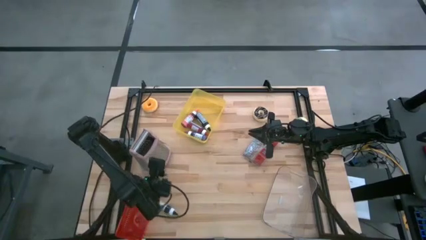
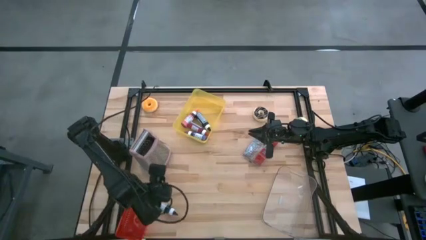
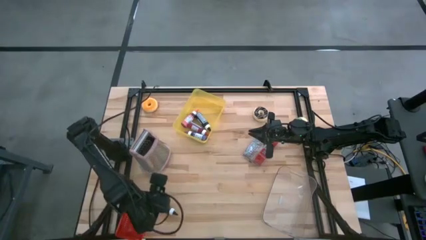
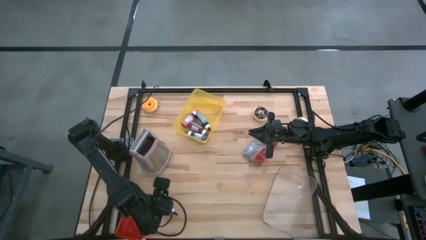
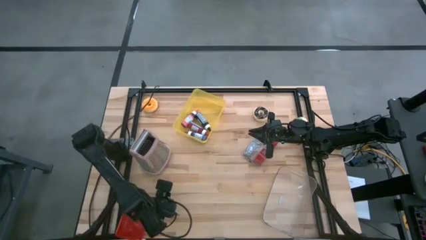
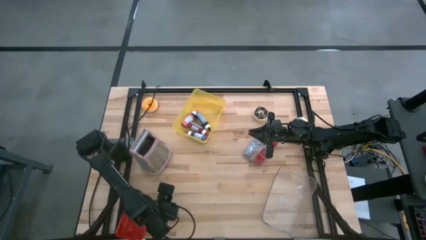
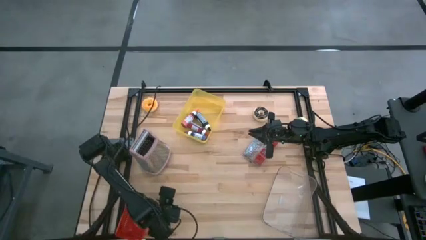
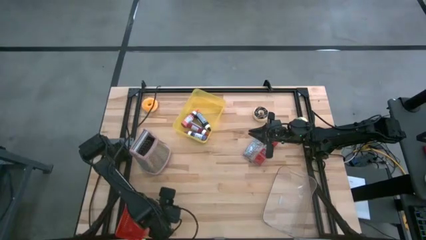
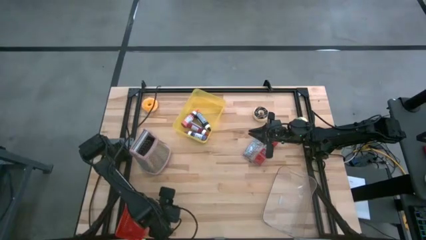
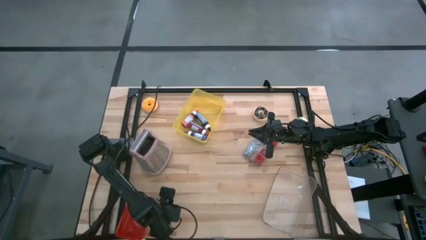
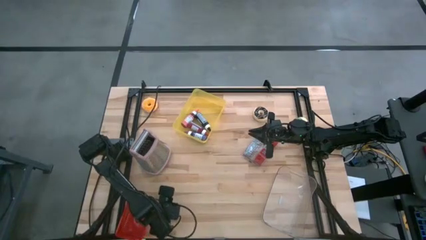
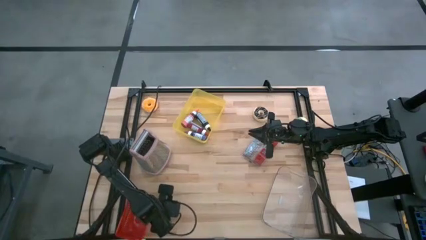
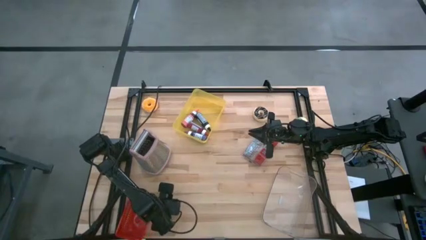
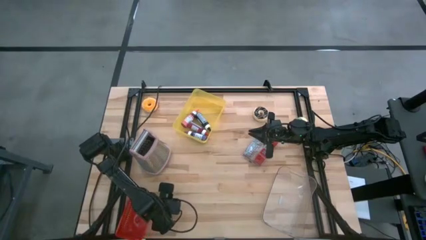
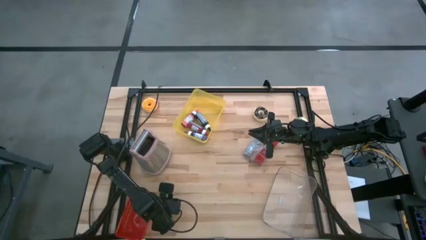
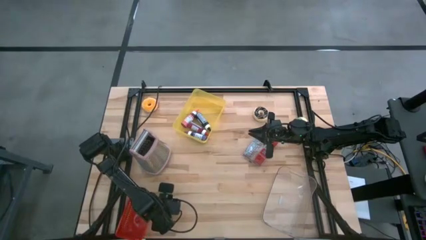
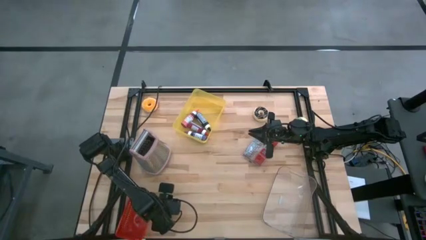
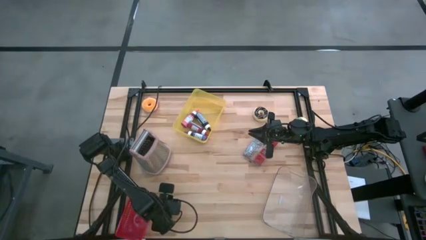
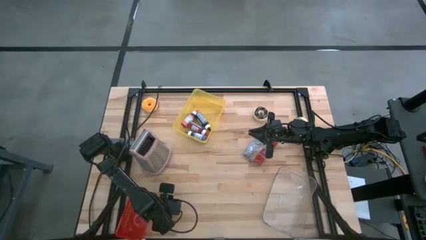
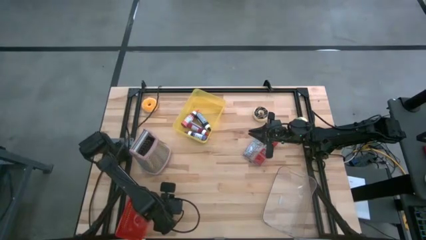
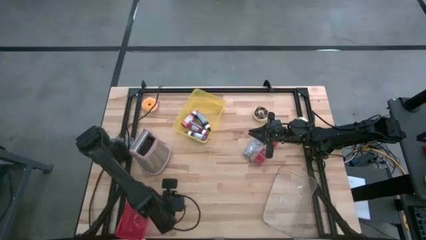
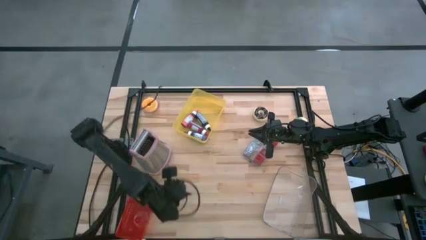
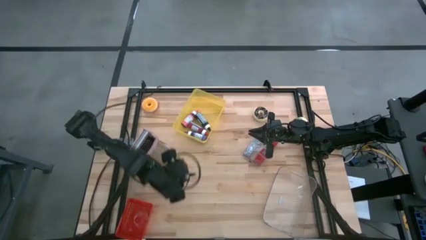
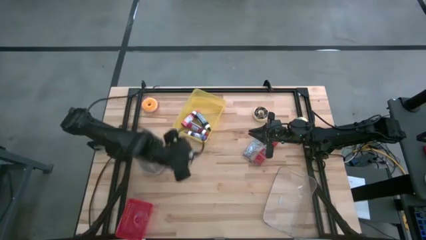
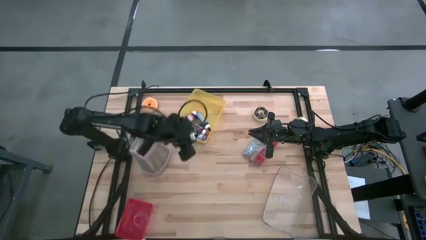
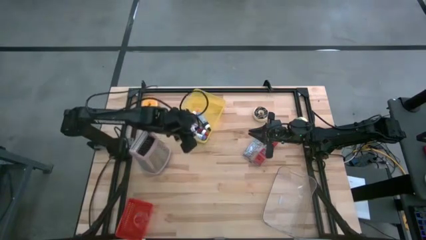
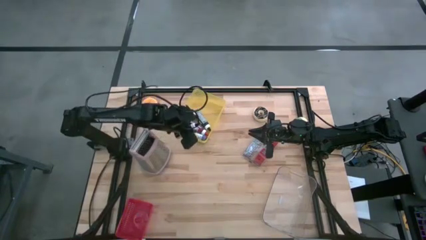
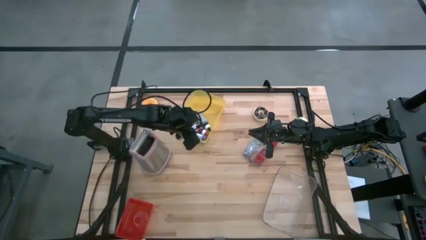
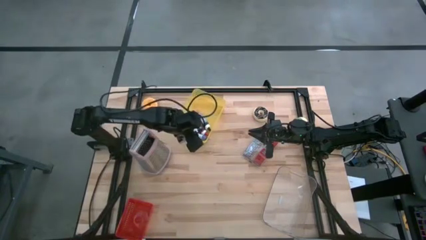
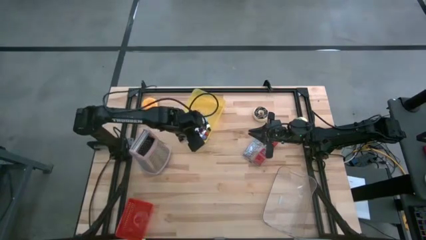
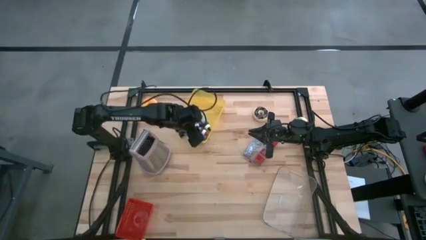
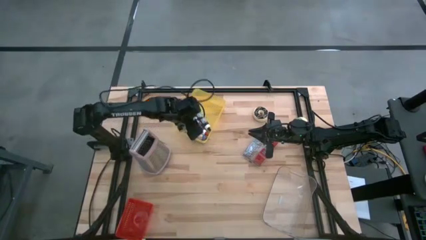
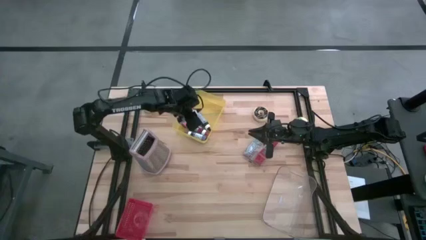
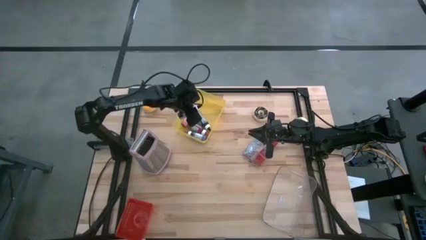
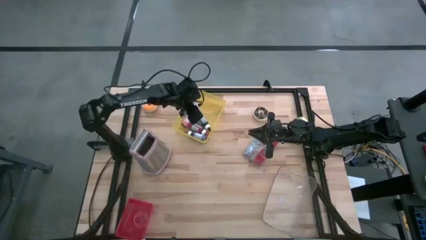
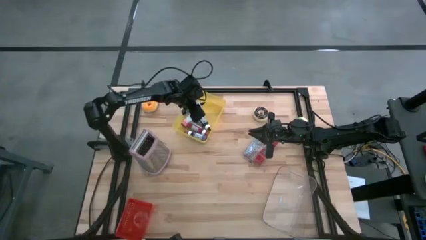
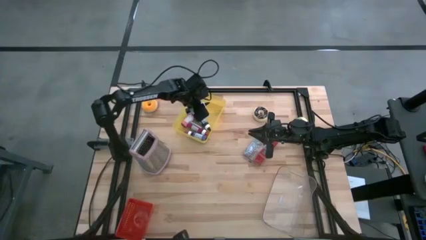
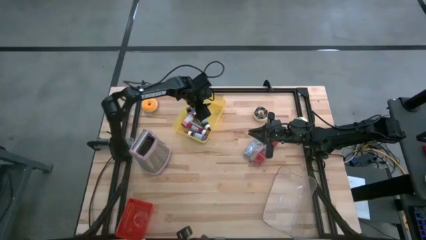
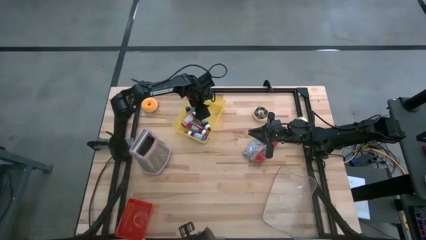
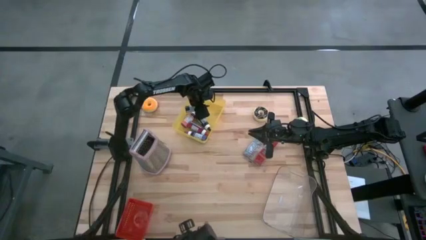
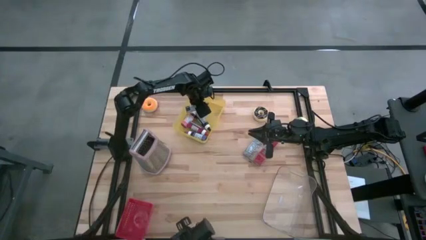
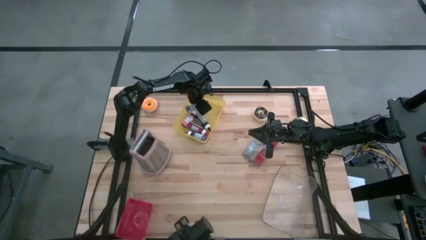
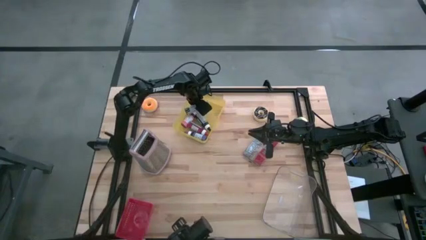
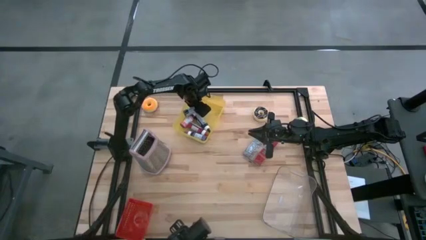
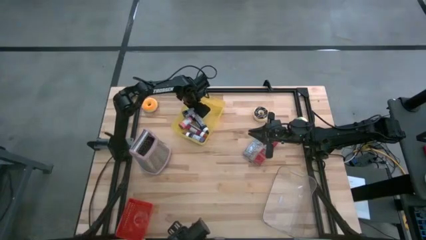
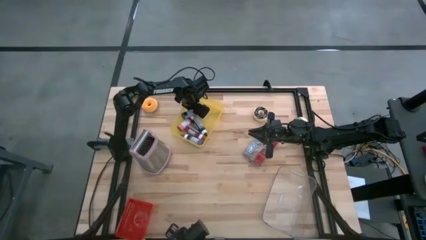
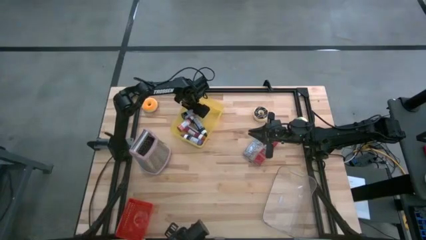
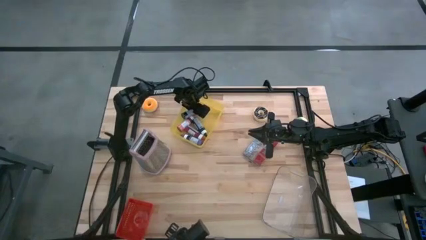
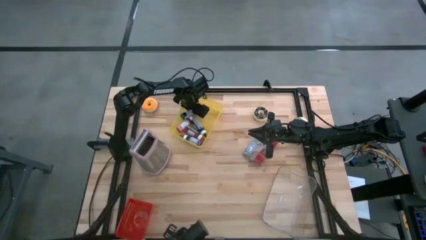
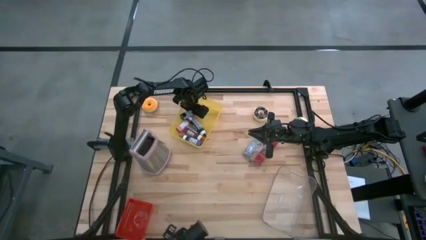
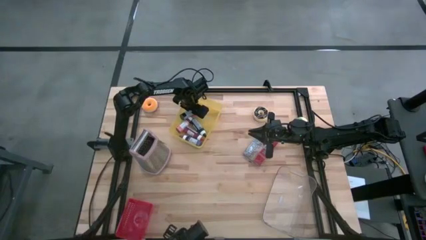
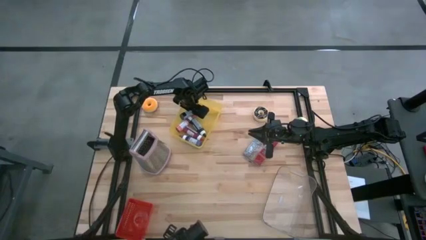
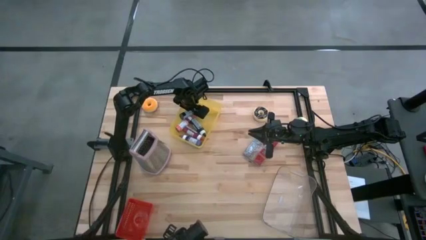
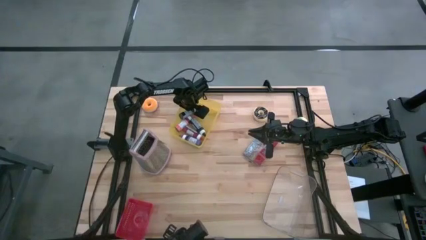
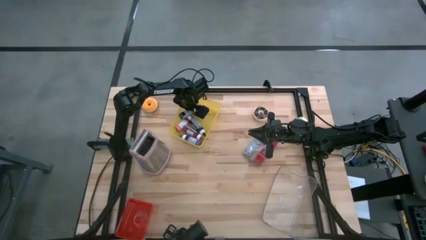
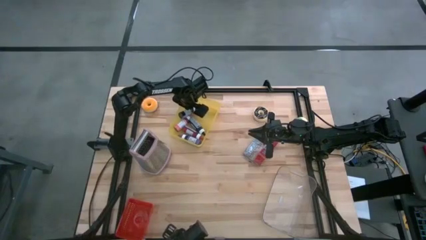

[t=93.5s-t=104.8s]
Task: Pick & Place Food Item
Put the black food coloring into the yellow bin

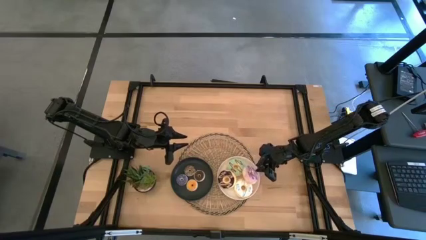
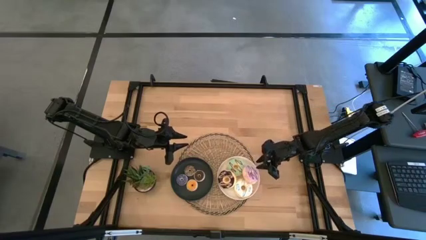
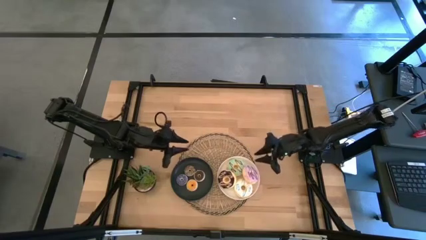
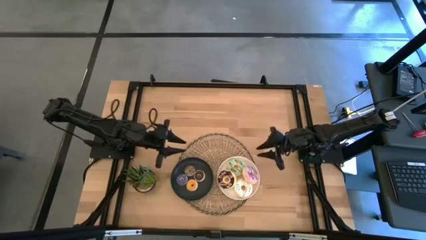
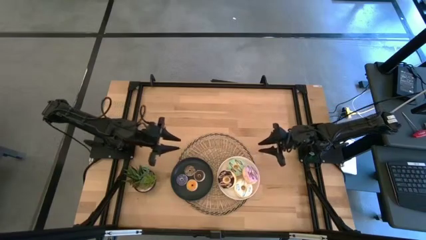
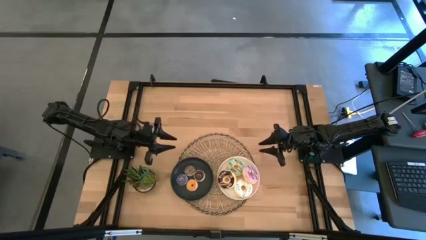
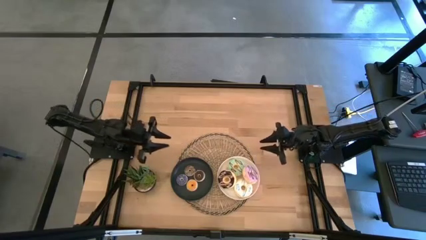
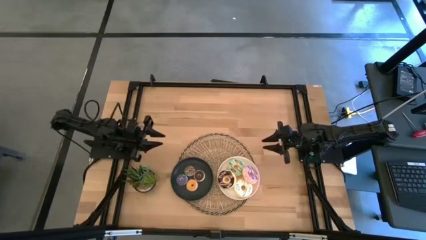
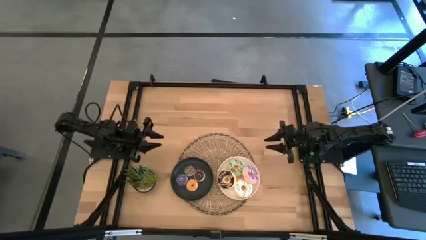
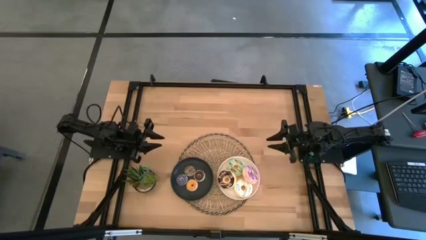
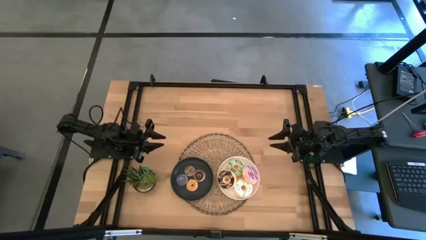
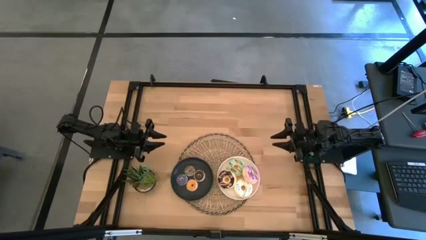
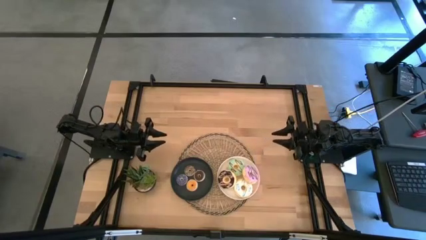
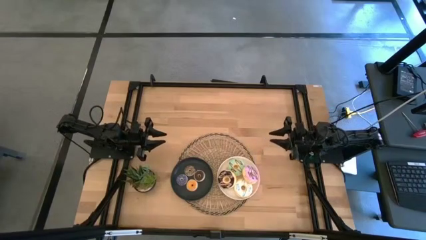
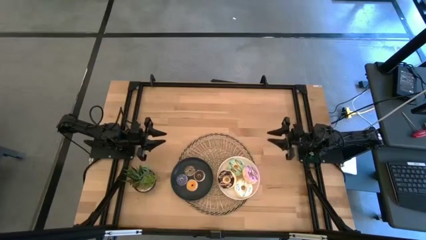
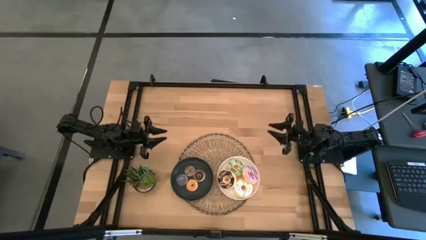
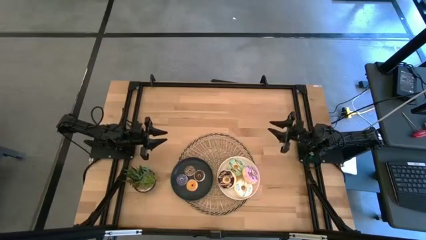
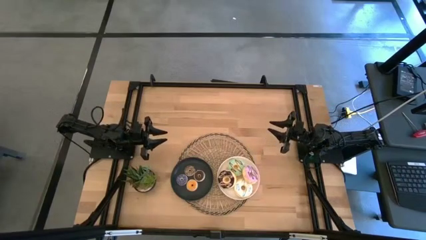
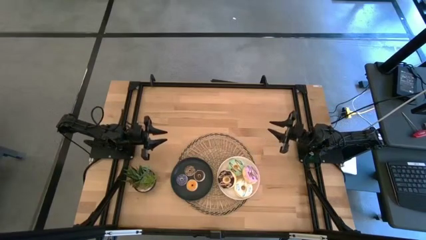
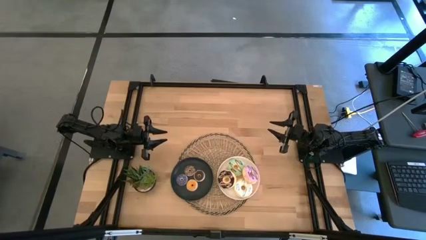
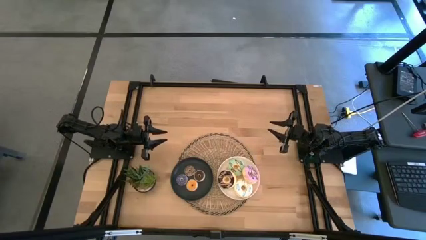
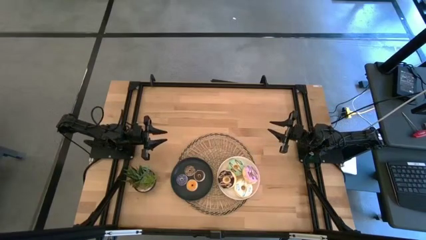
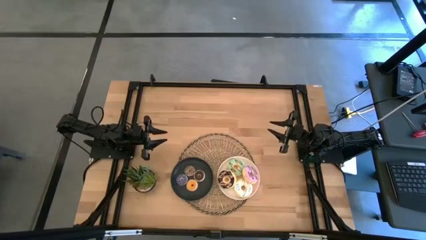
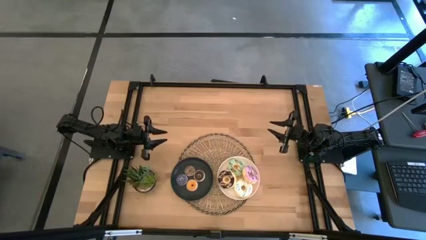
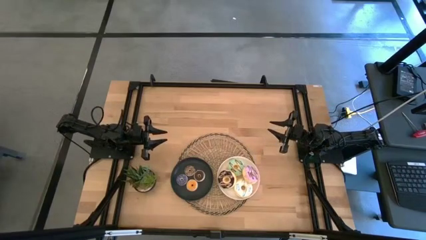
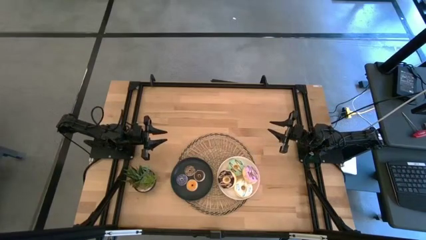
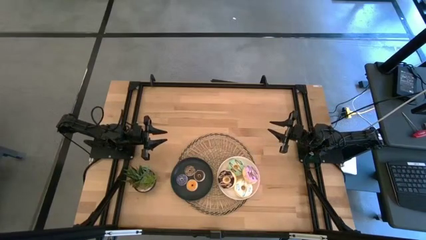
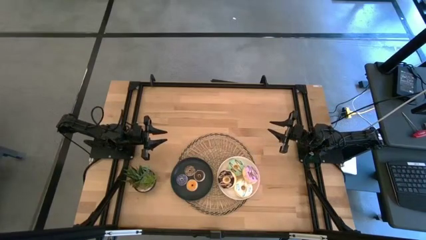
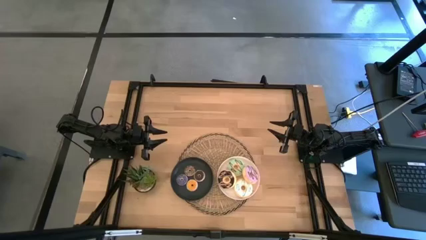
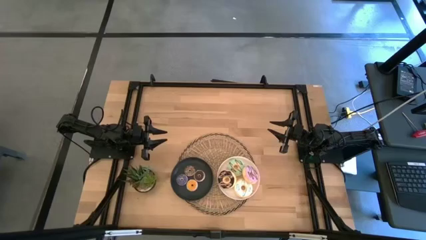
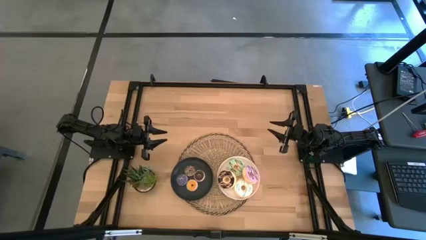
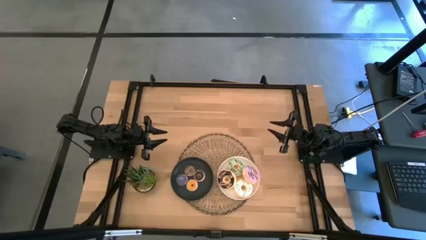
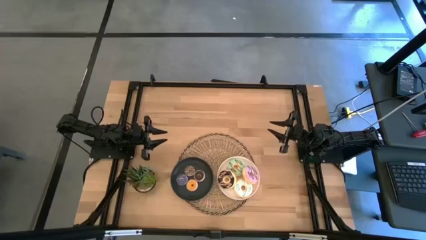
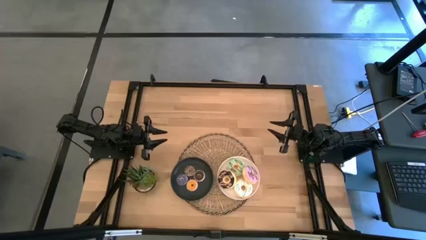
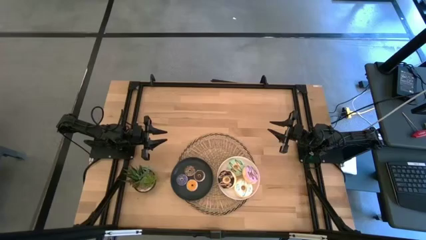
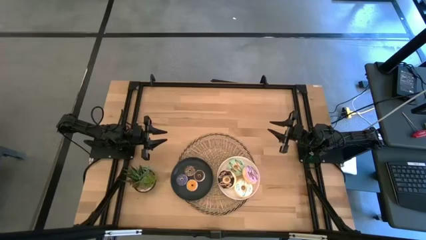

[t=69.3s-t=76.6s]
Task: Pick & Place donuts
Return to Home Position
